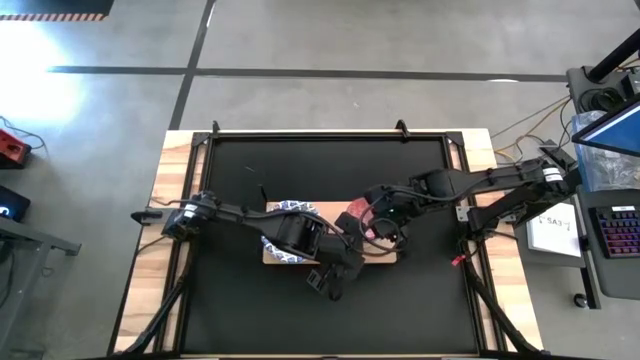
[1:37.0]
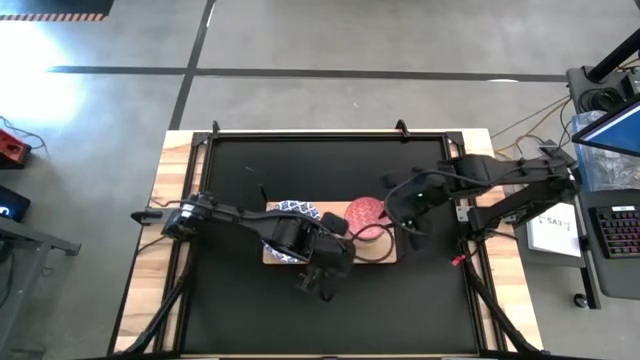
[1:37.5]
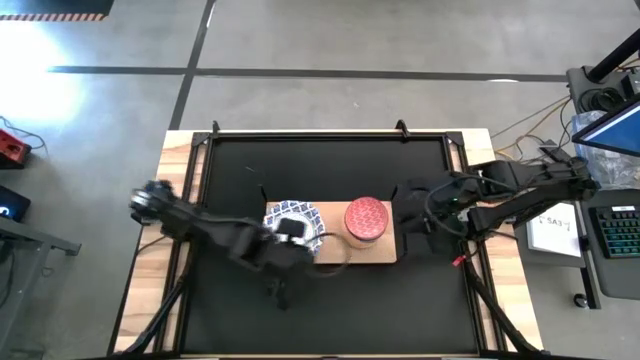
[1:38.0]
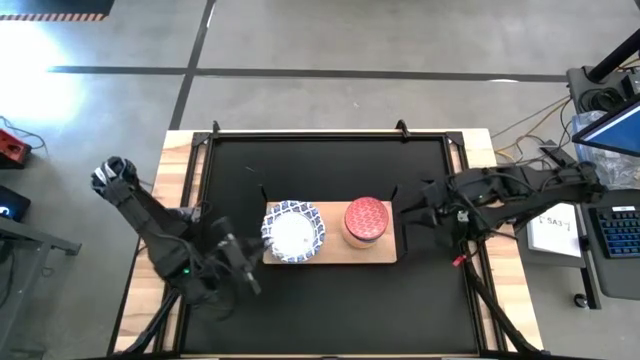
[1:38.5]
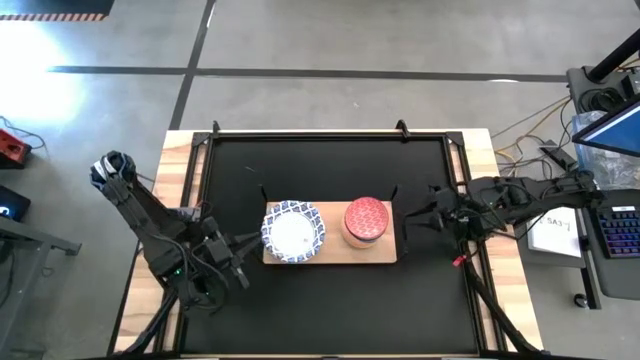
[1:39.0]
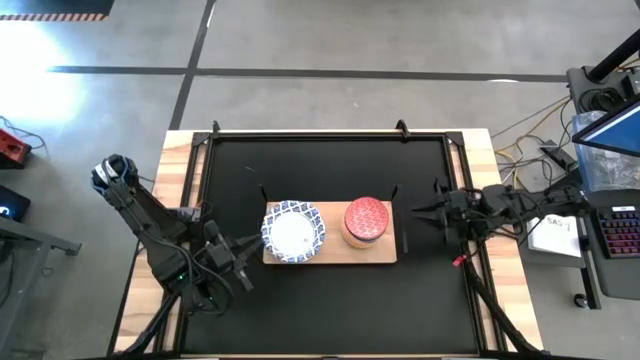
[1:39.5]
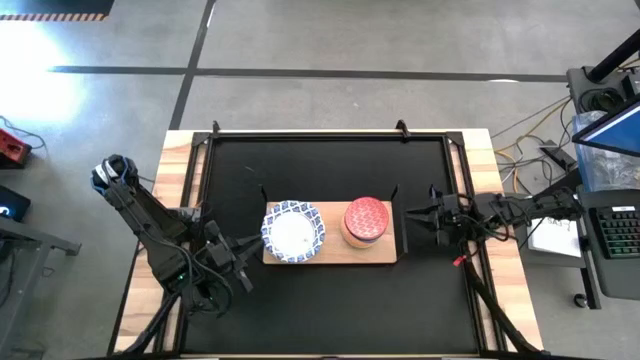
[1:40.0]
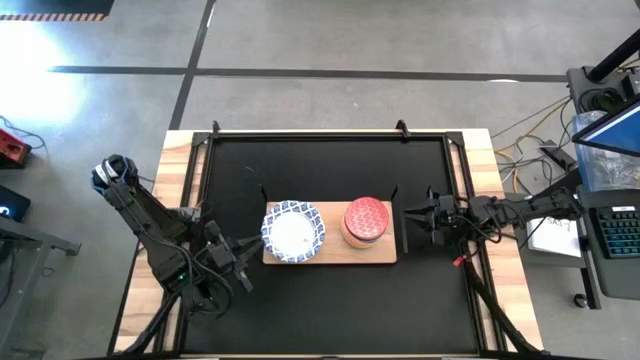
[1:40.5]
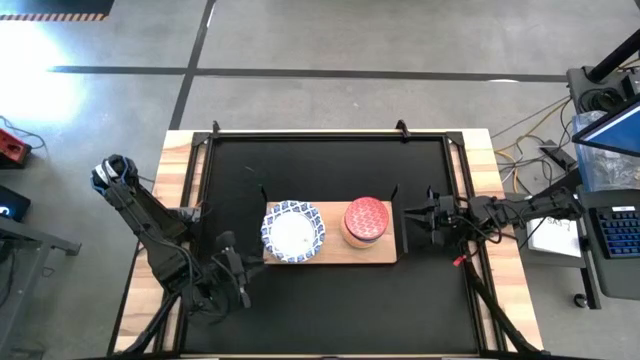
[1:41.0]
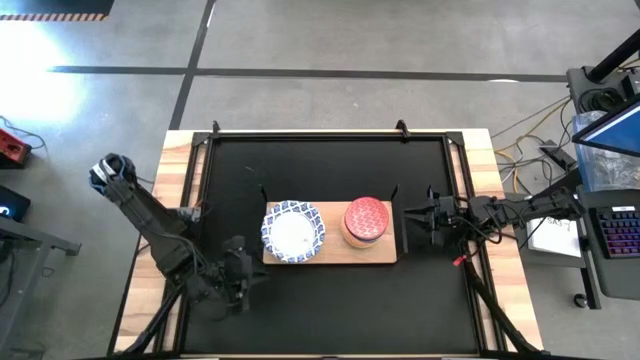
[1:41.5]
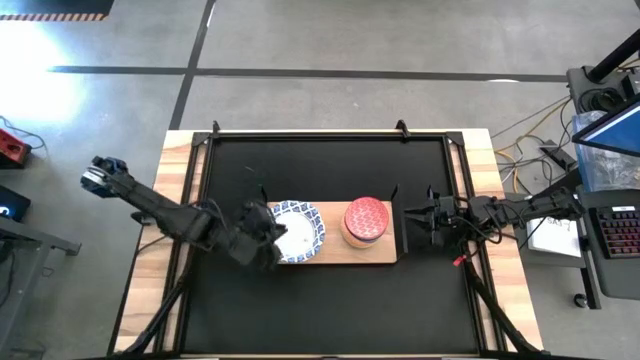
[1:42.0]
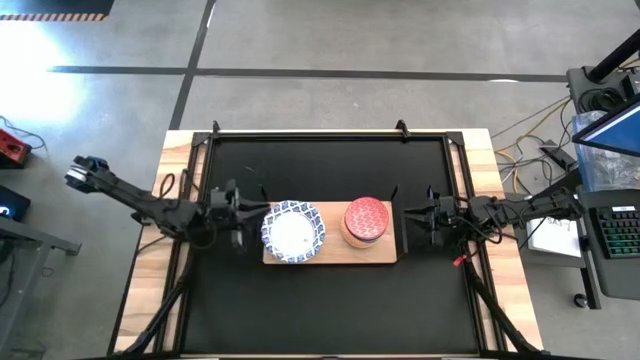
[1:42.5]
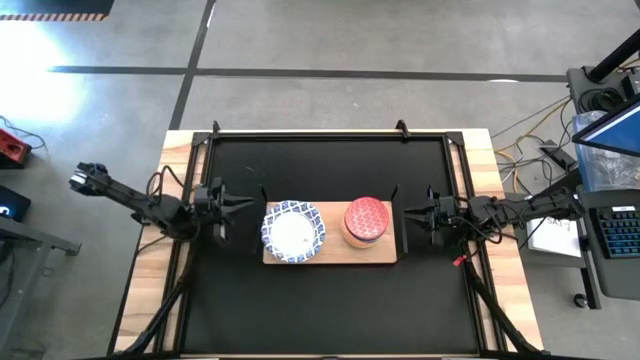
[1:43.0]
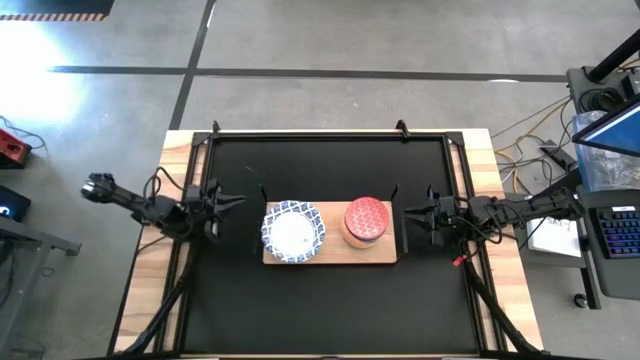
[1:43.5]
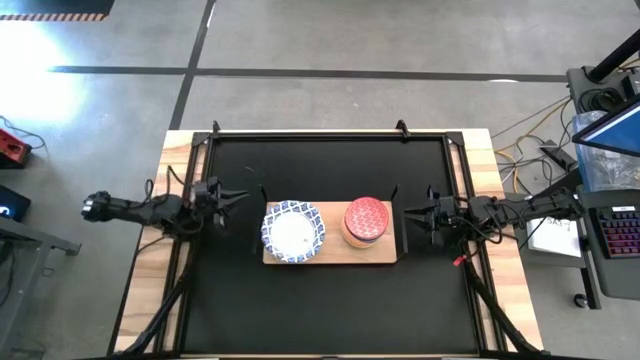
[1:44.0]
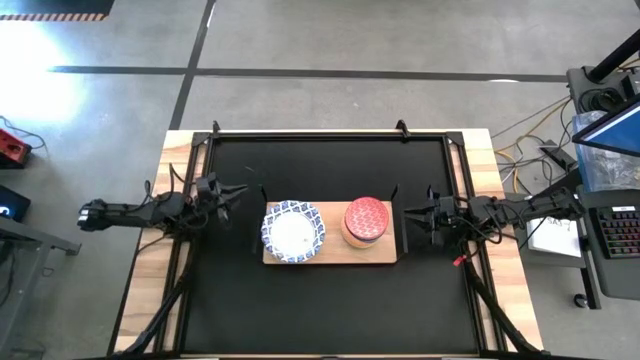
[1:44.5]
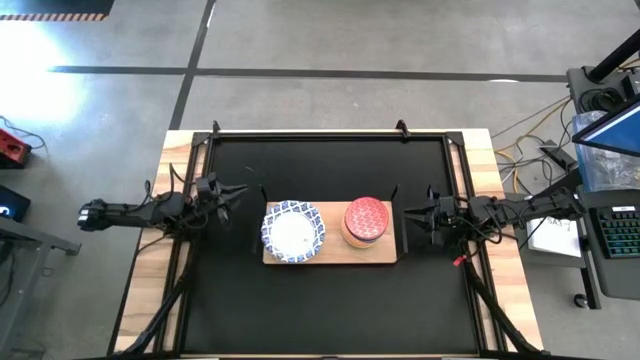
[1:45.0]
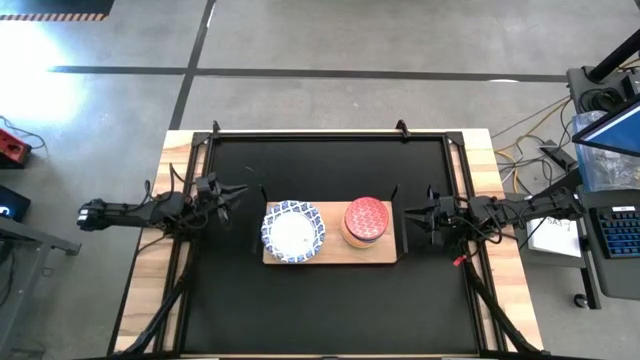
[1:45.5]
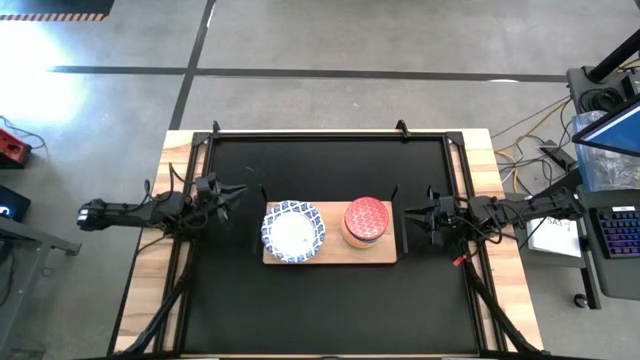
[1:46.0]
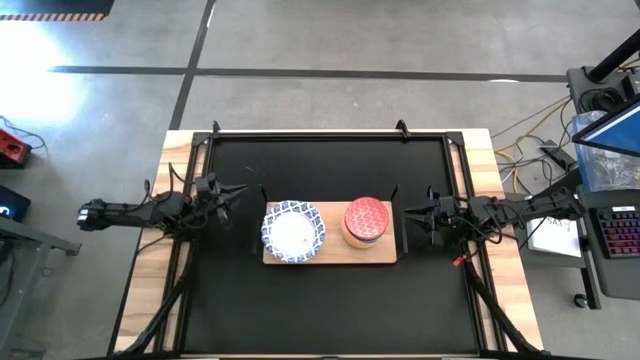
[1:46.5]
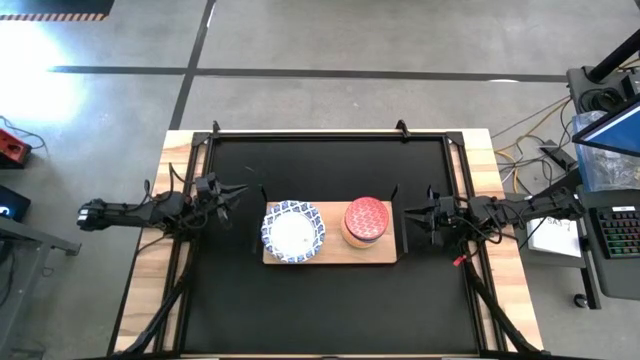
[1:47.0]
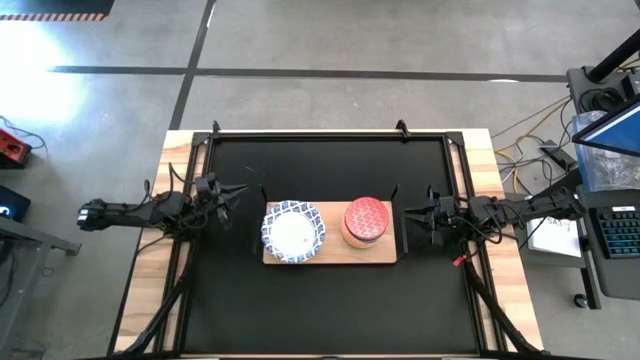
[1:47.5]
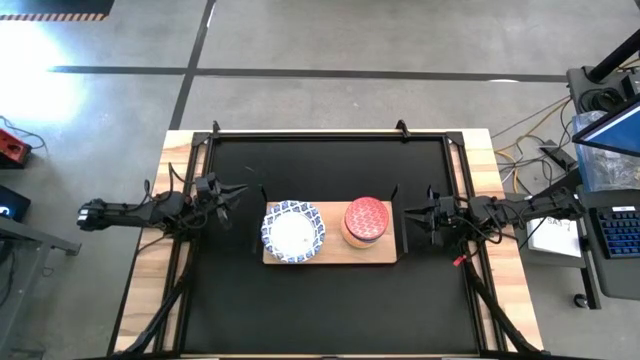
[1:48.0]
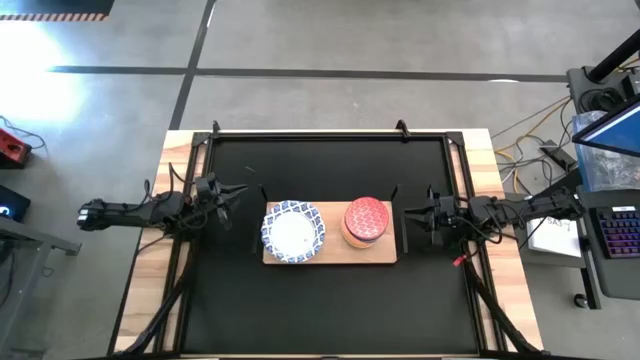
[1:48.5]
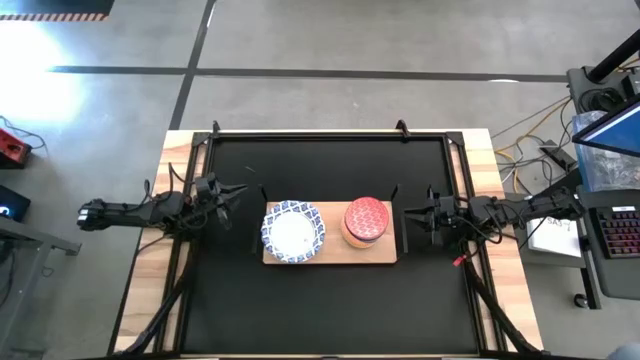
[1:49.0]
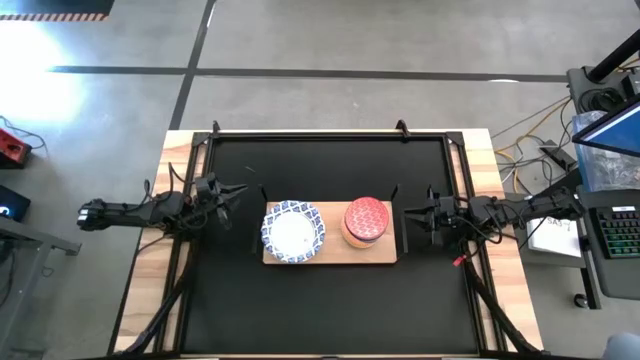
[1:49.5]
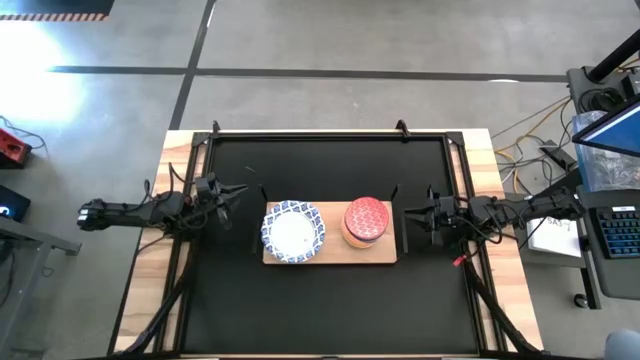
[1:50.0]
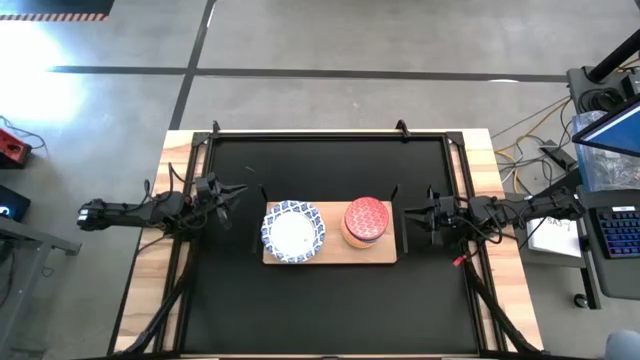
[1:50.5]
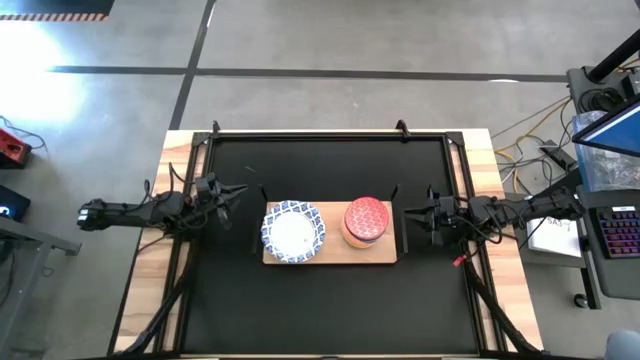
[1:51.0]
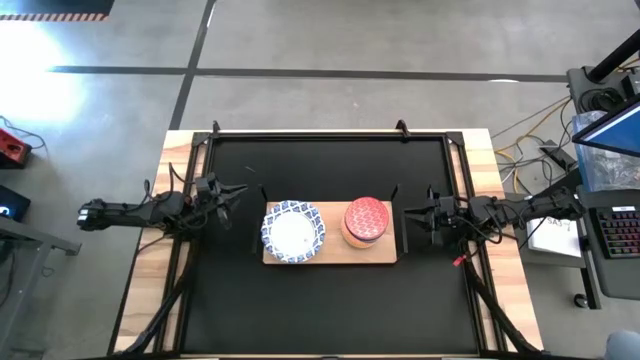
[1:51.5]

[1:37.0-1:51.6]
Task: Place and stack bowls onto a shelf
Return to Home Position

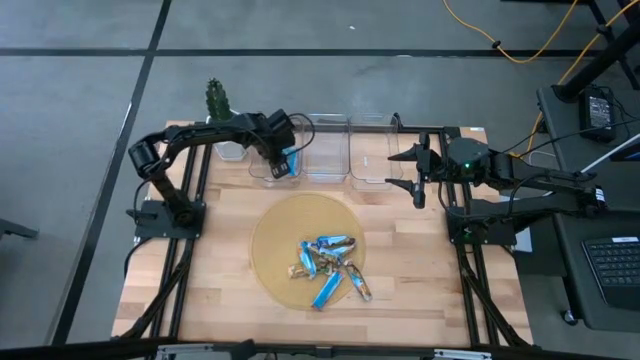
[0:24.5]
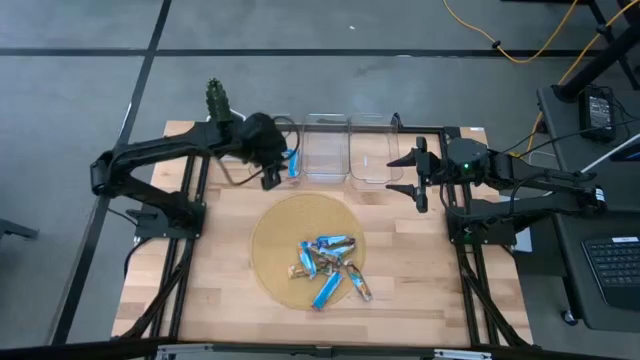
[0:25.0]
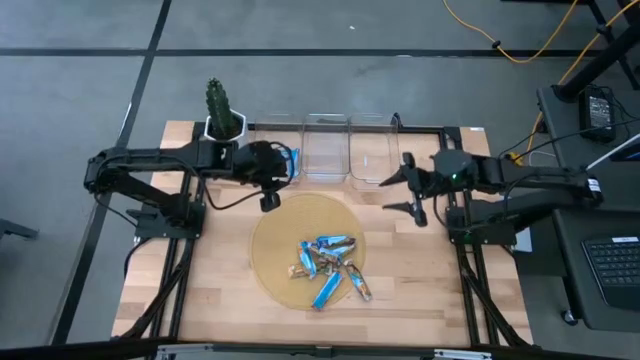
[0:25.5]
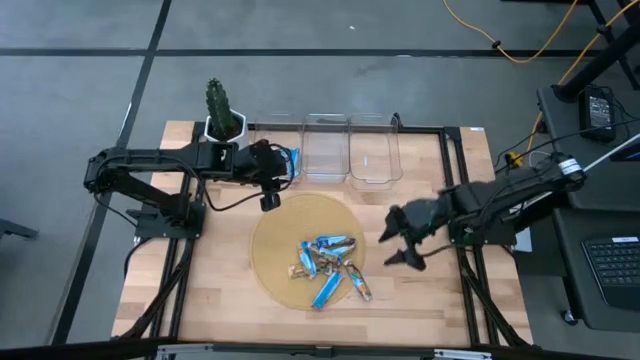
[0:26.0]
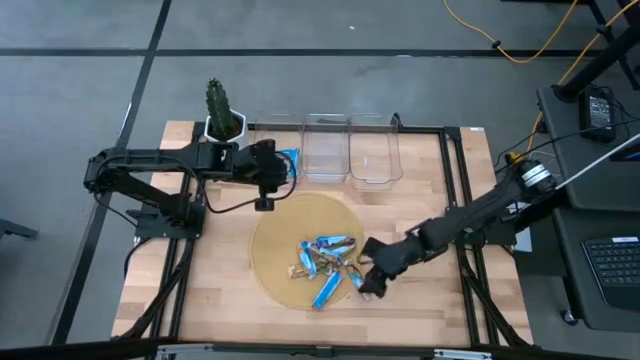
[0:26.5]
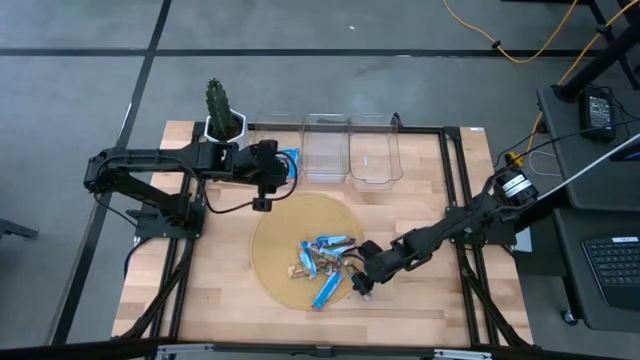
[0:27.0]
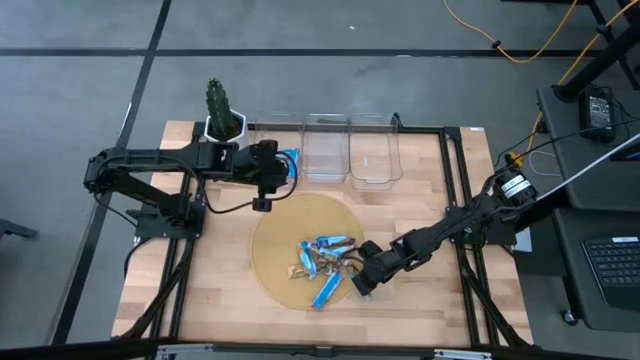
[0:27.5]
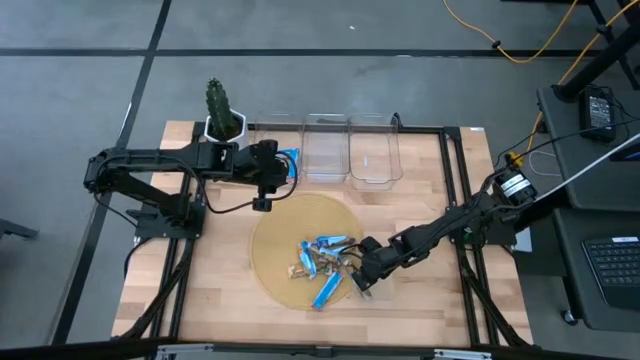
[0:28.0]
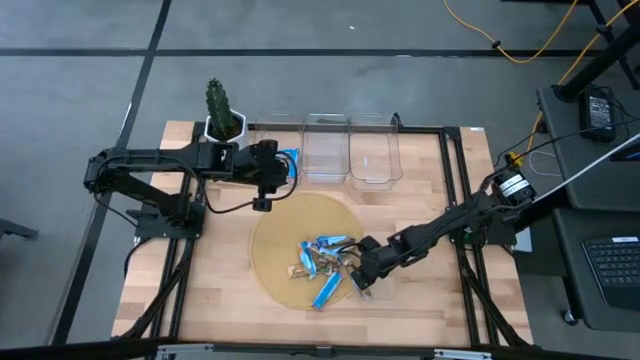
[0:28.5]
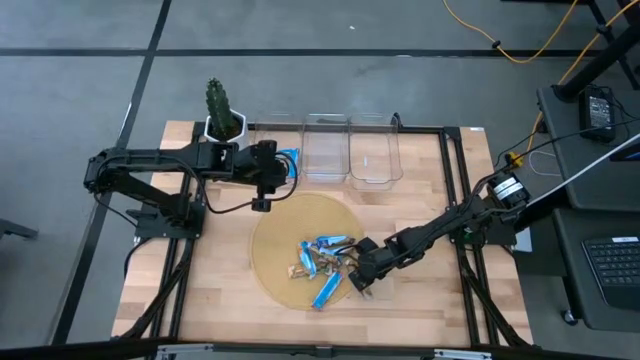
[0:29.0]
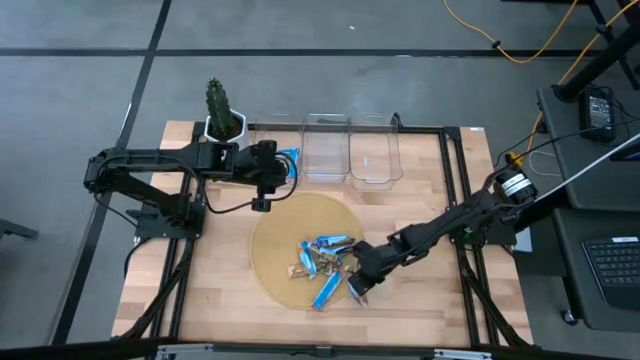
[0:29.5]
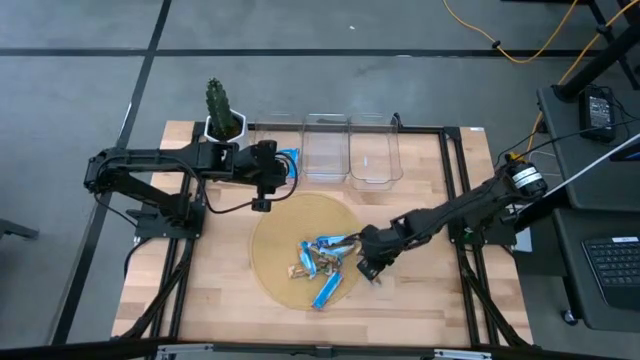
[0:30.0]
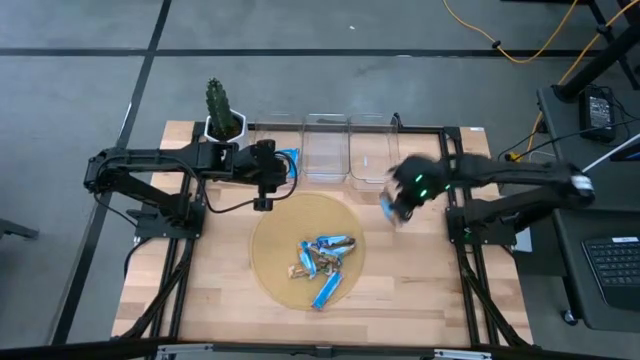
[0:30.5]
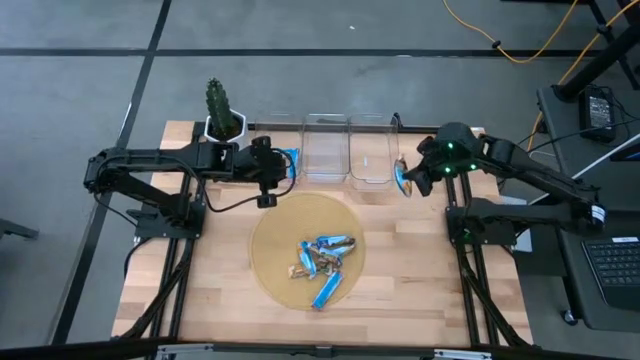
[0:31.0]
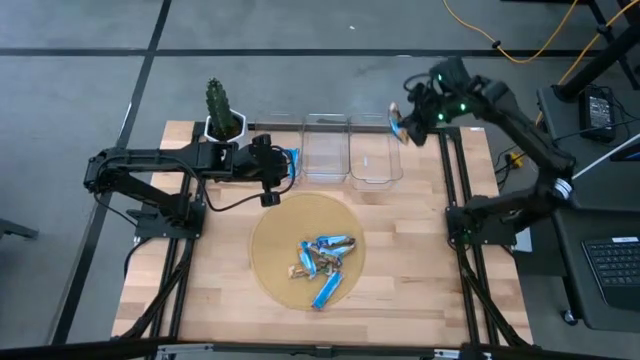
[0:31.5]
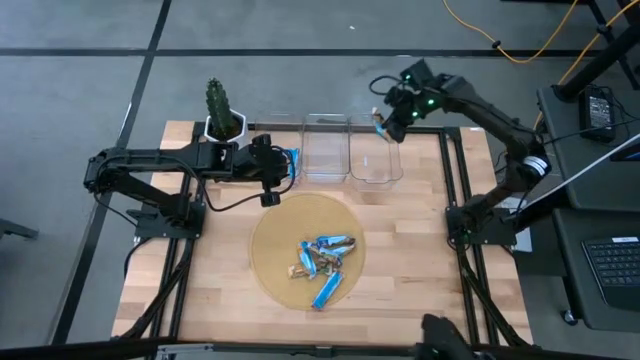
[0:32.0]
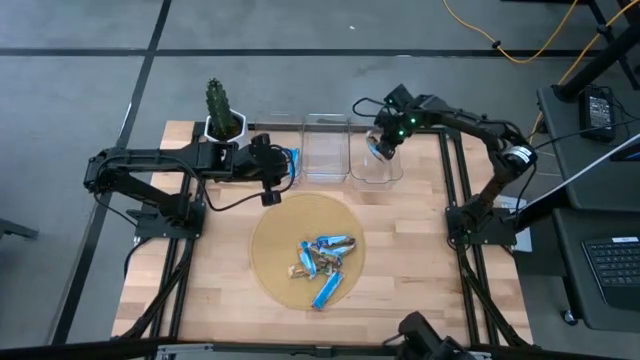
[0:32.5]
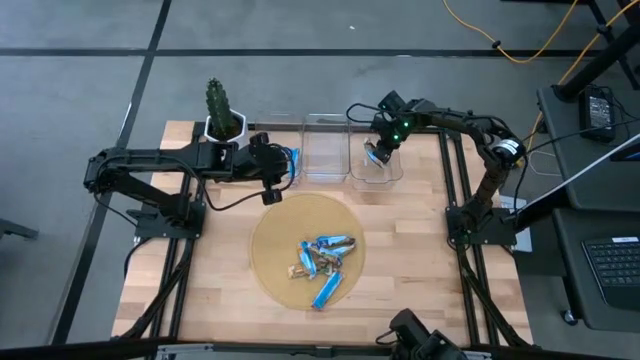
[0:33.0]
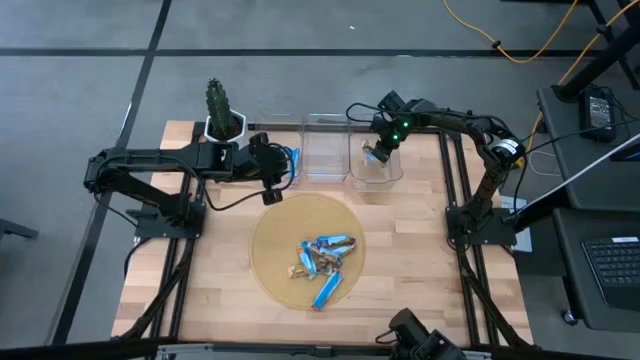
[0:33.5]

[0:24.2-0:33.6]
Task: Pick and place Granola Bars by type
Put the orange granola bar into the right transparent bin
